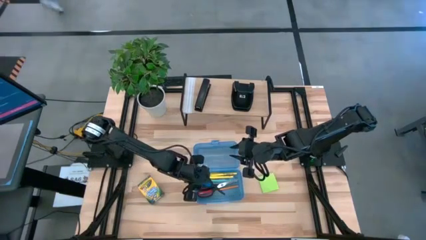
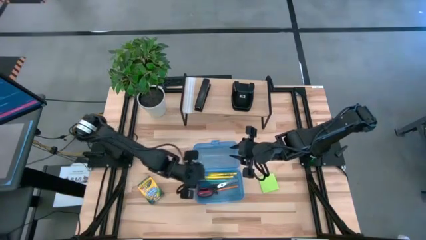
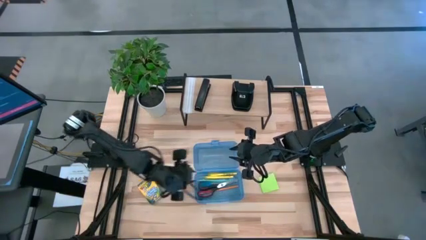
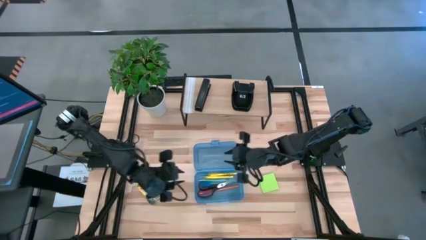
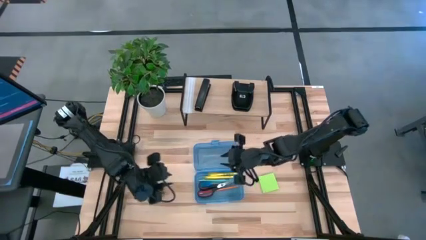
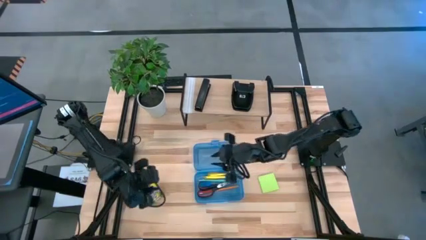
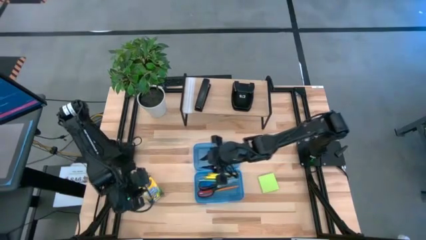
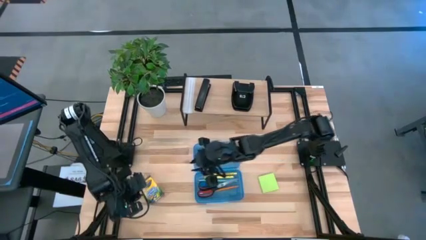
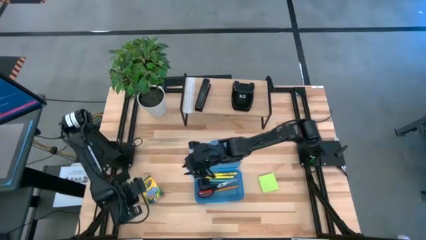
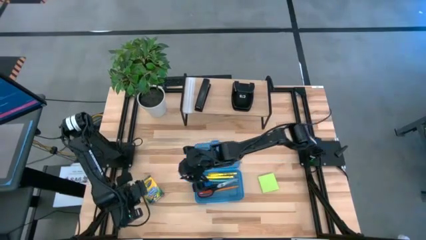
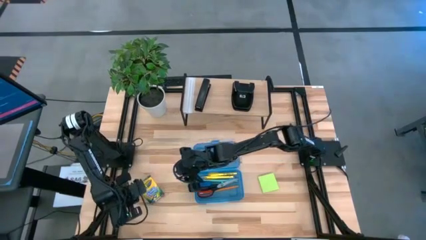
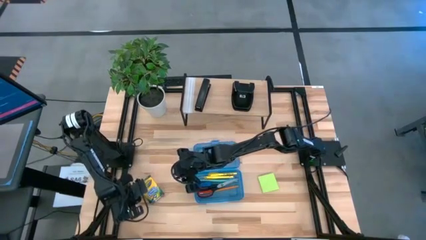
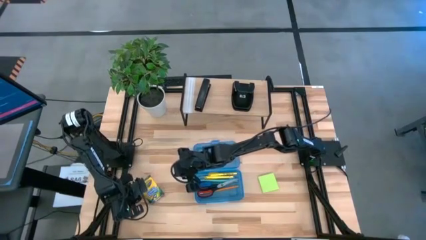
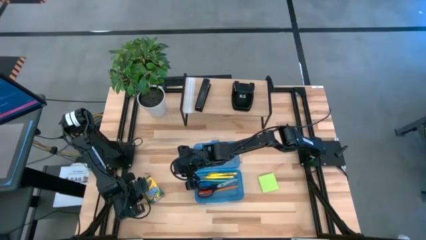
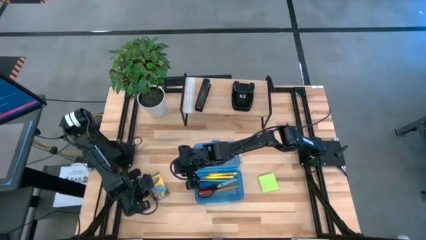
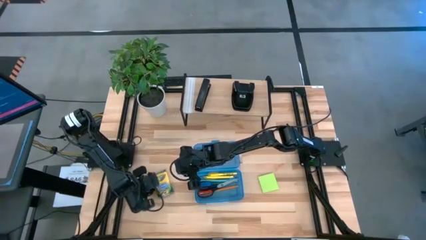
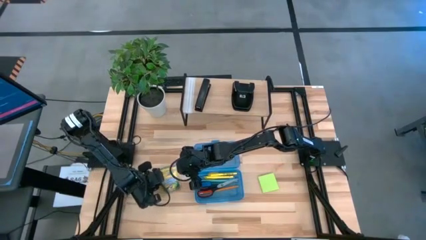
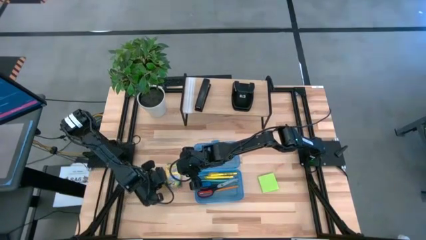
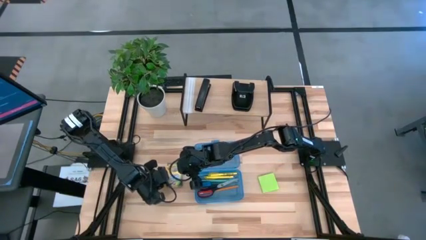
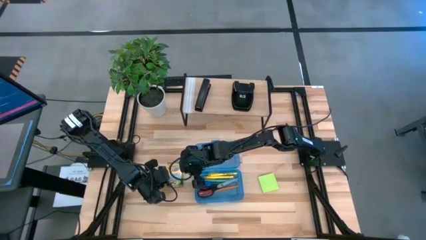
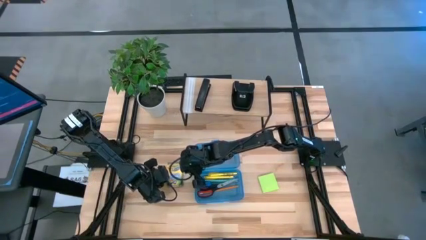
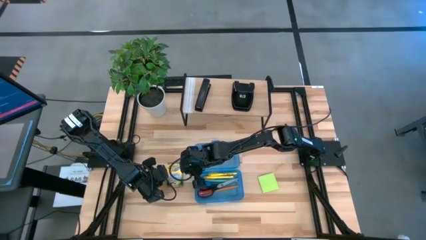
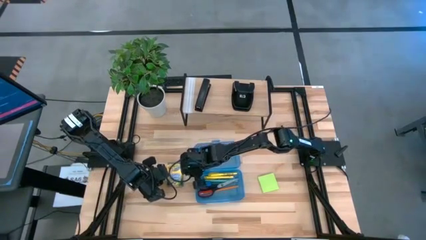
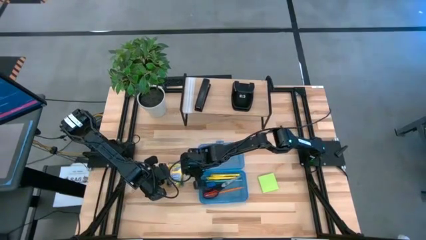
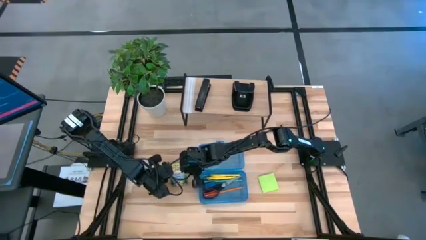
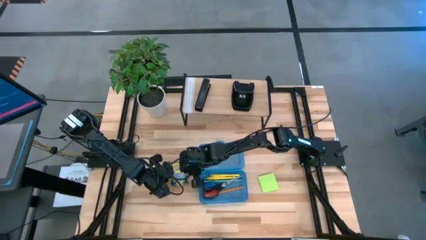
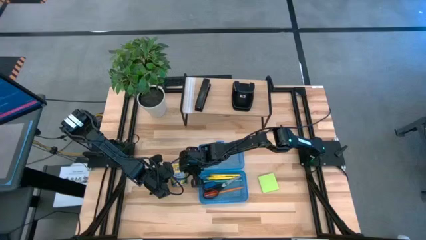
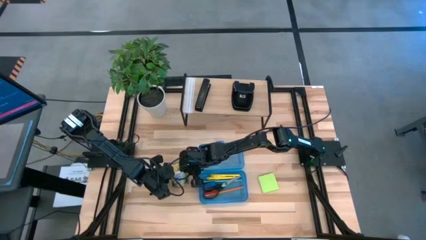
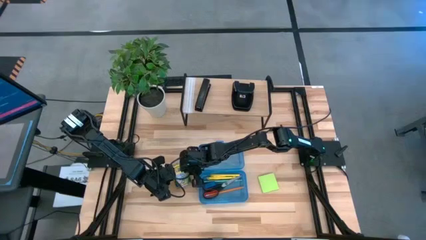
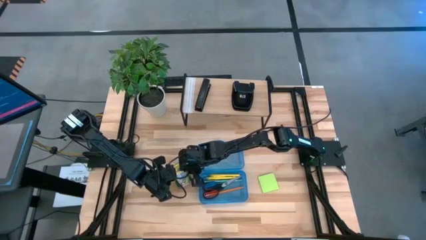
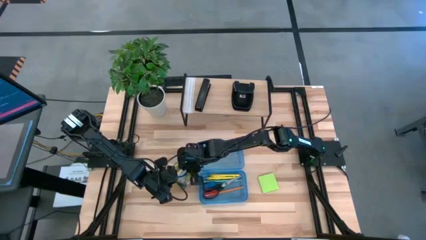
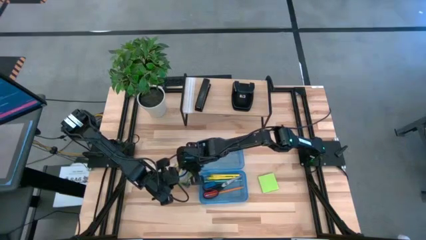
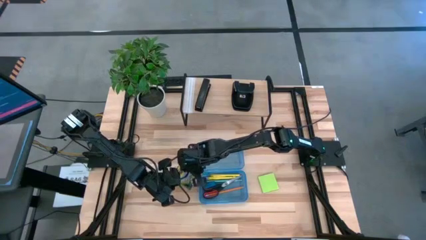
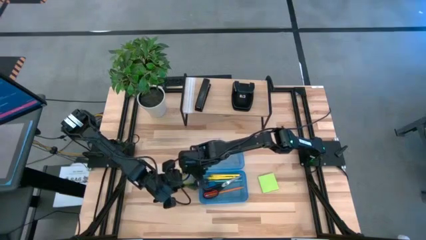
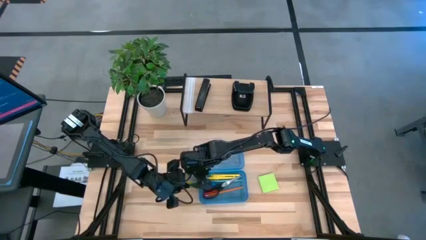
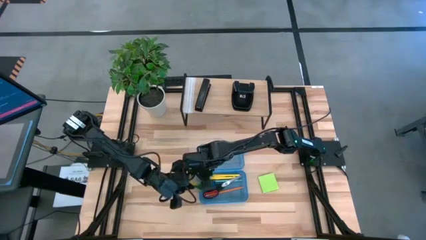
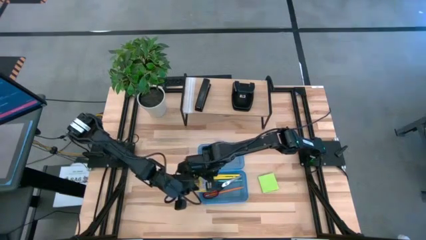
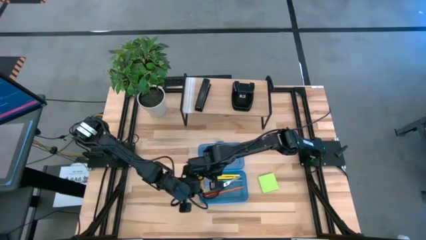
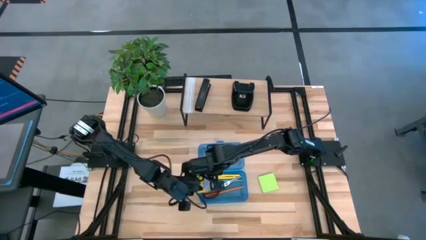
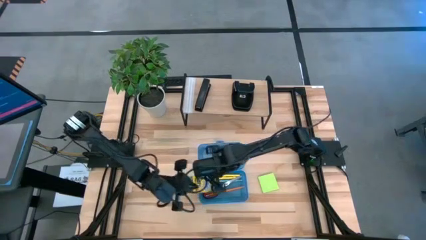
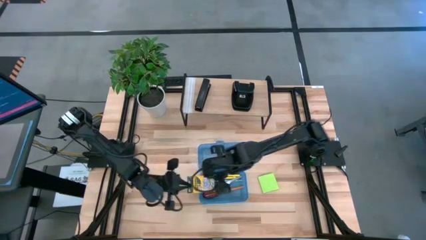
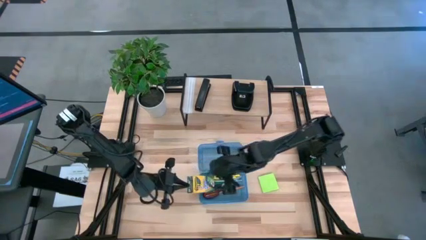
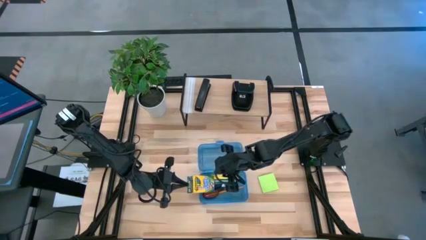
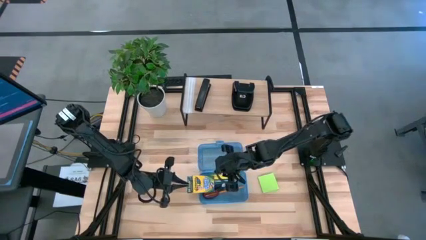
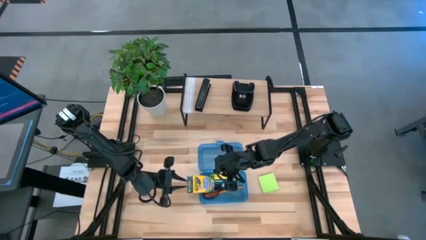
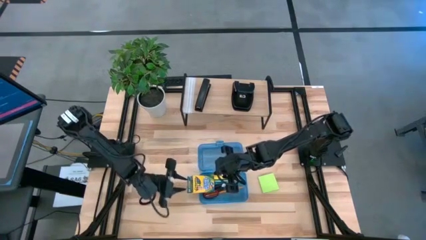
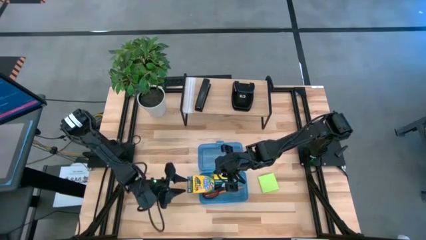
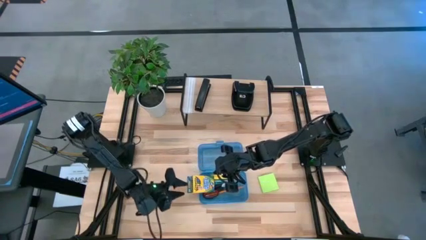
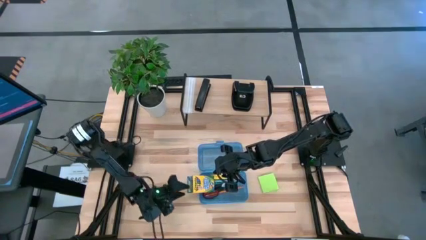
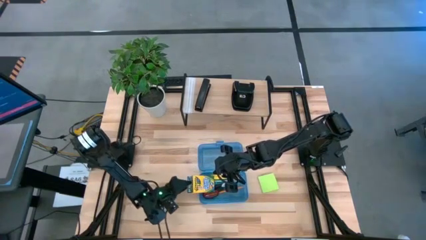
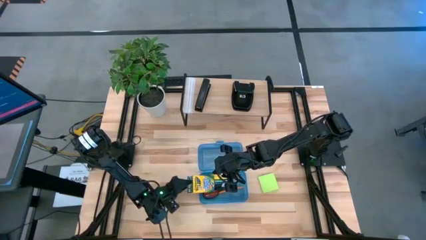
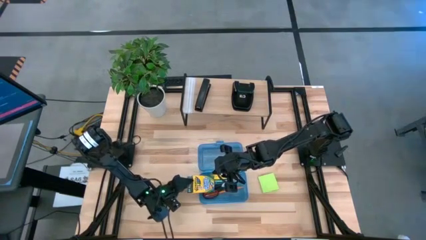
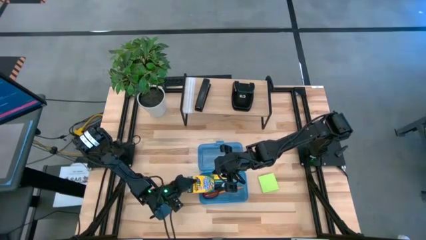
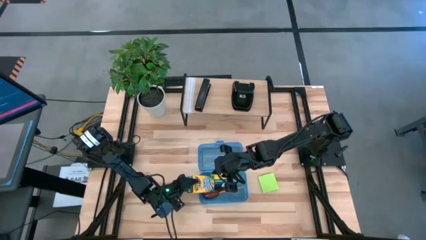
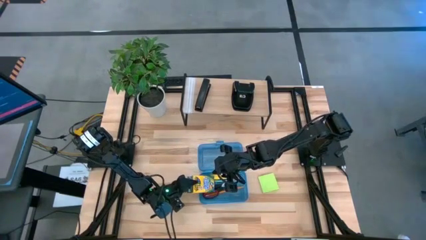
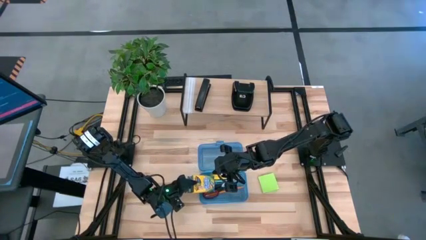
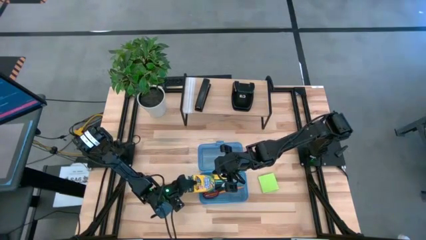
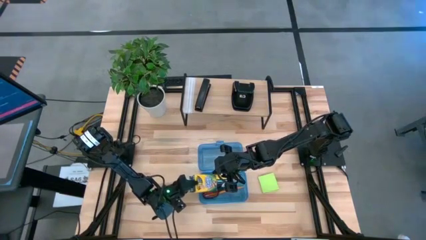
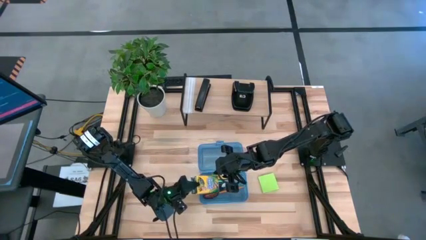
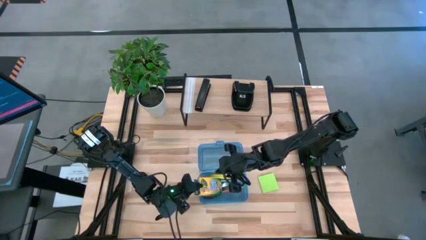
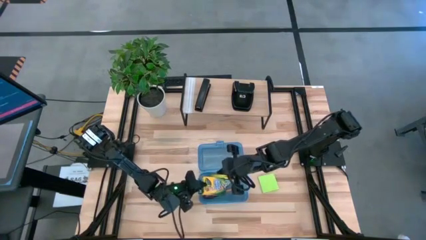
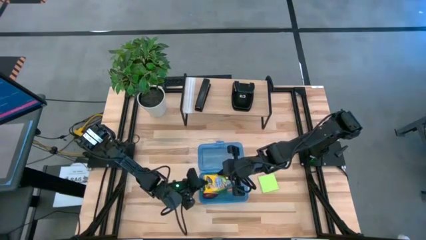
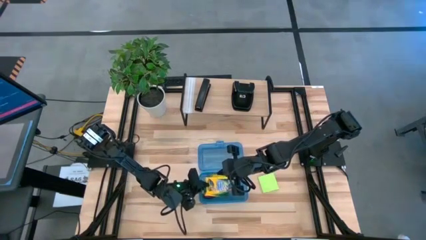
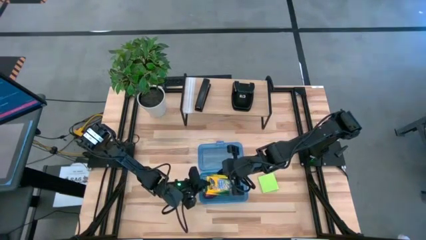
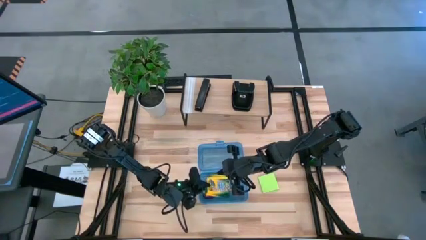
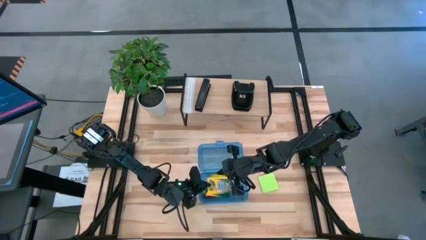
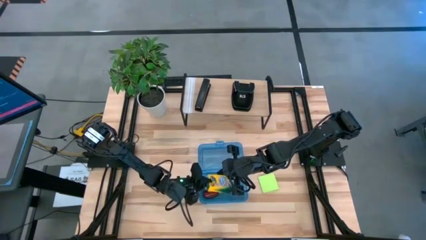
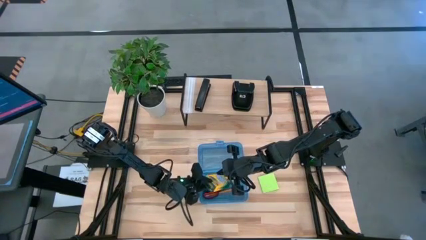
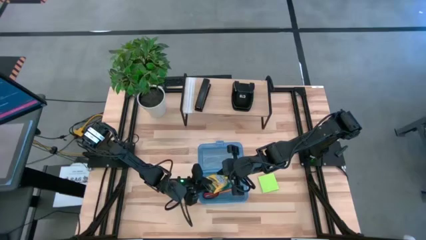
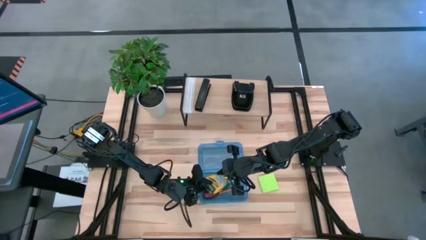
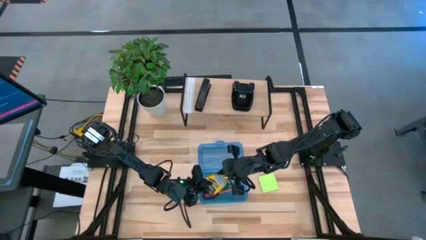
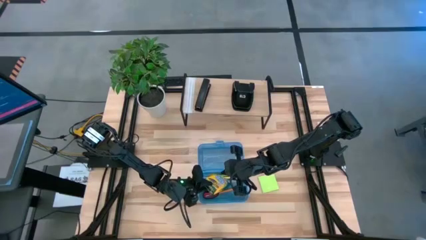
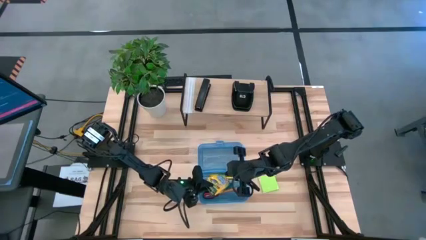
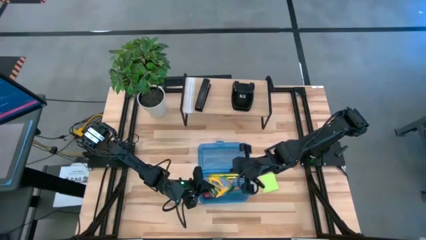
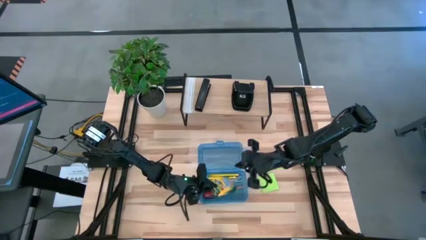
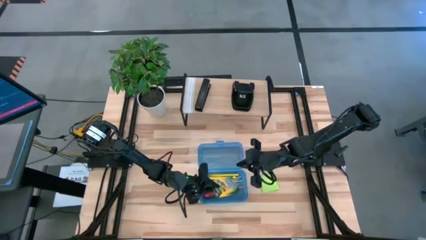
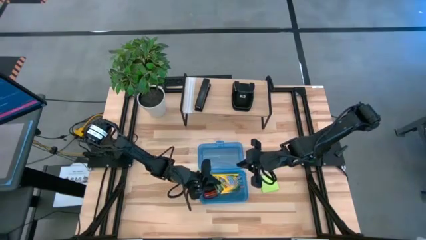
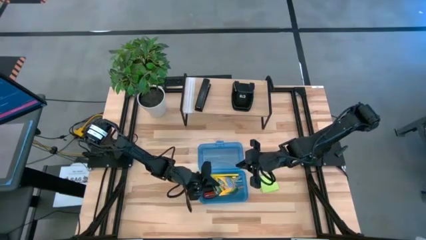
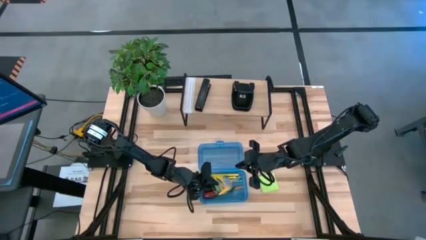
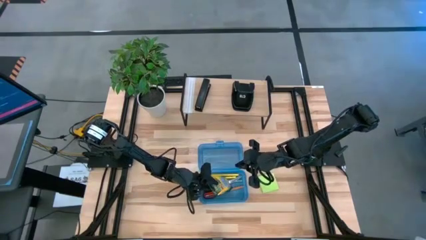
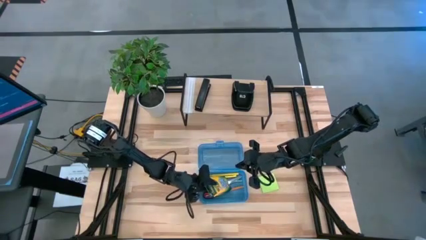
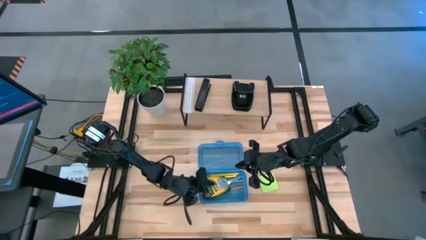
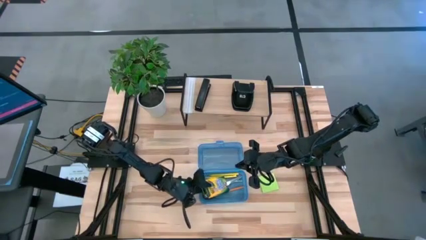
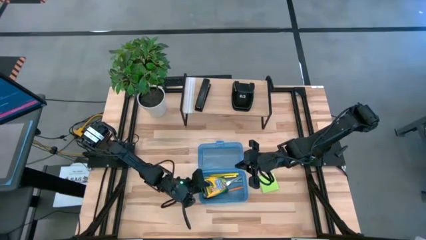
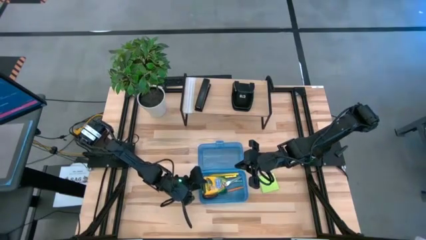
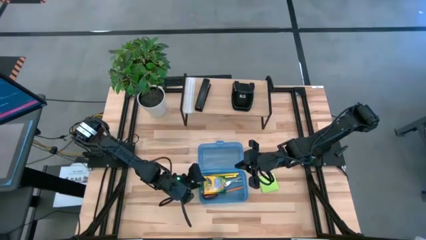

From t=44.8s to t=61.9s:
Task: Pack school essentials
Put the crayon box into the blue supply box
